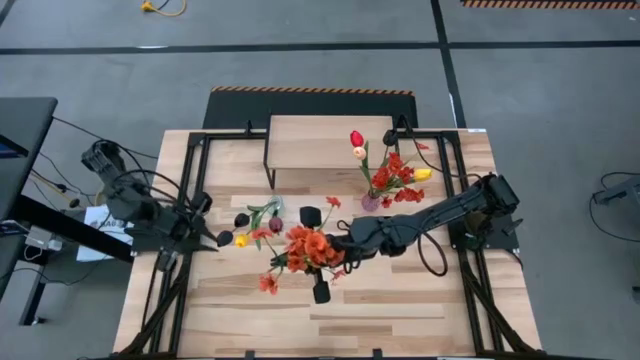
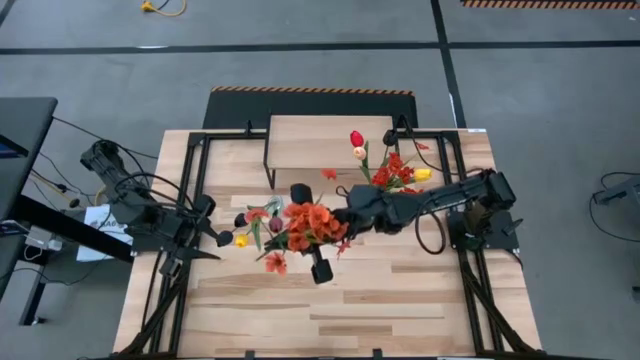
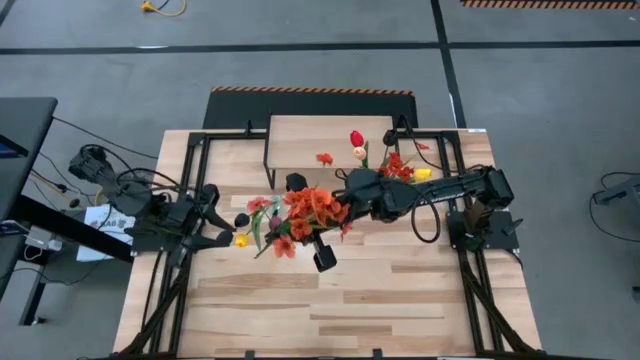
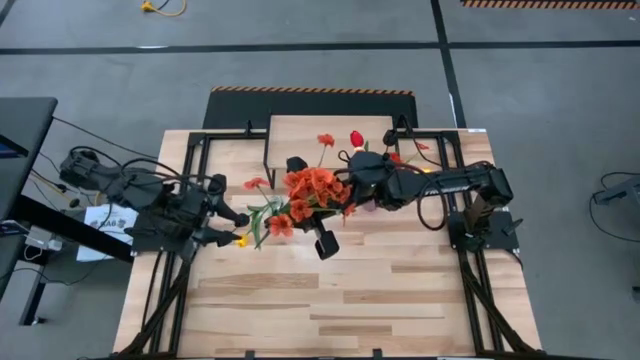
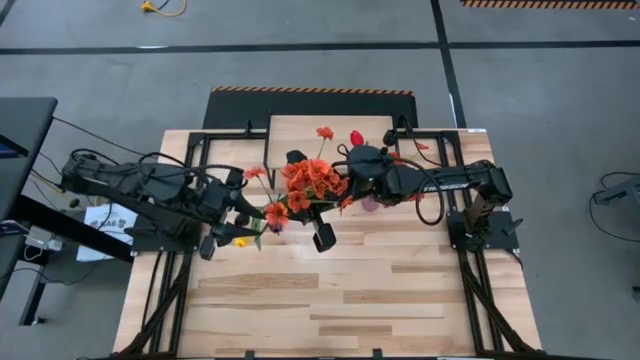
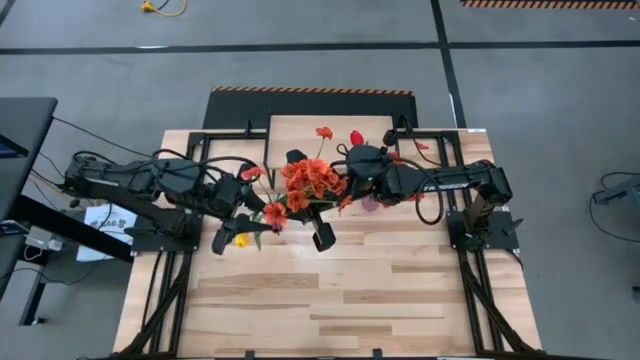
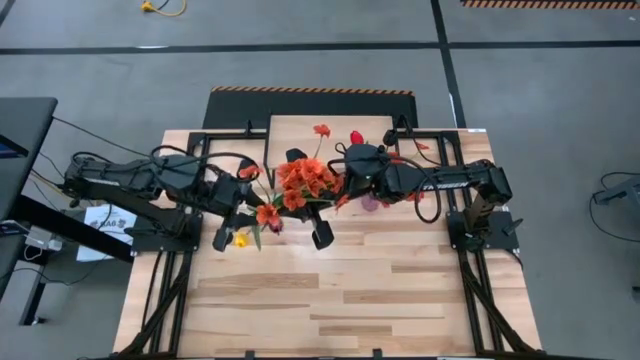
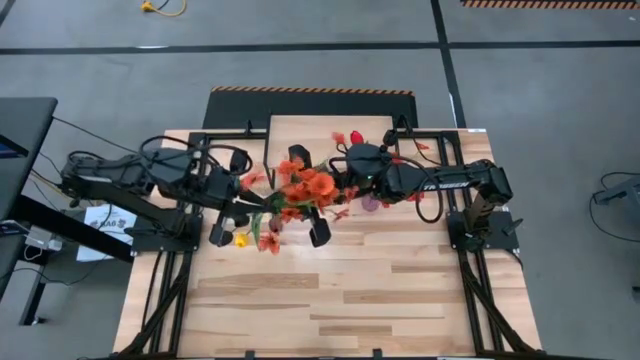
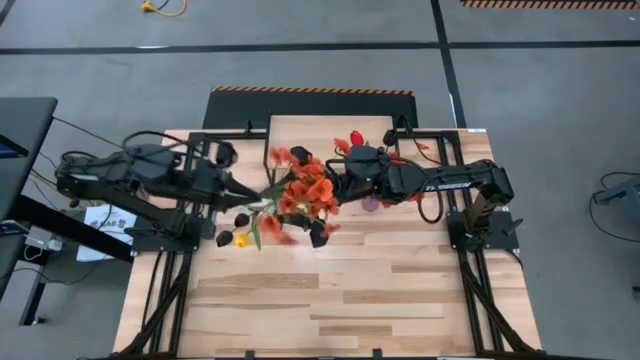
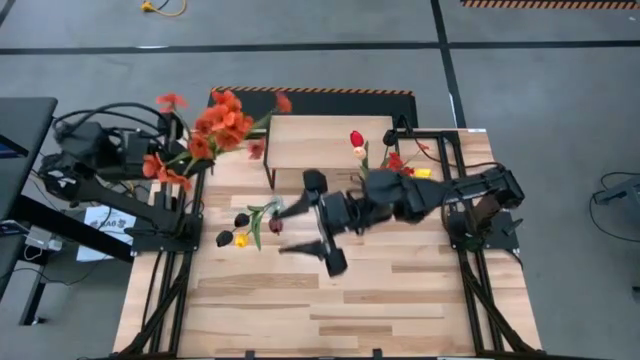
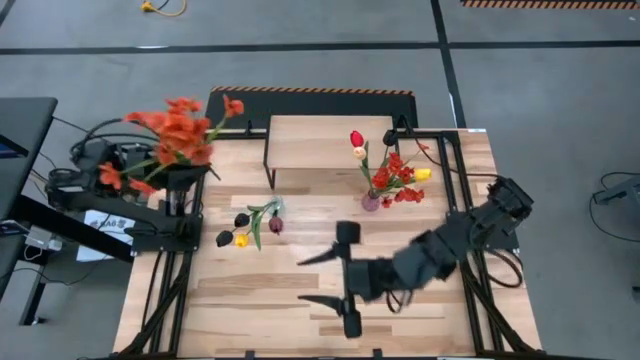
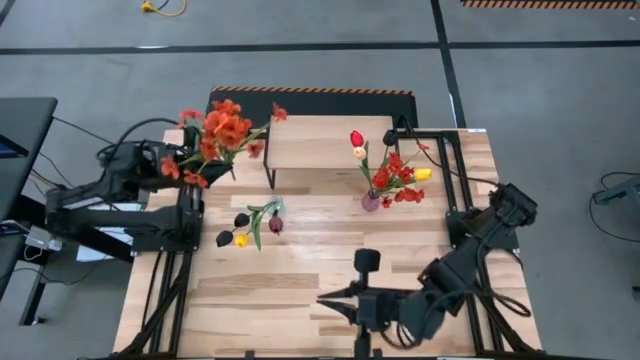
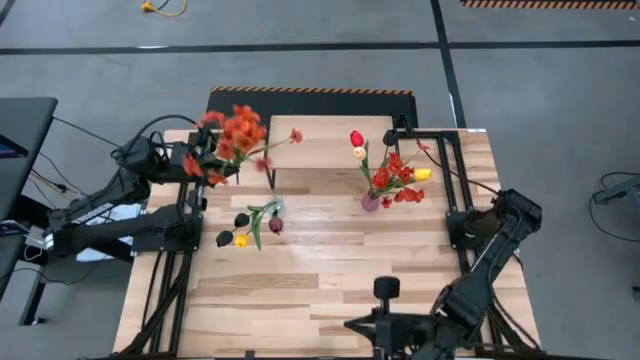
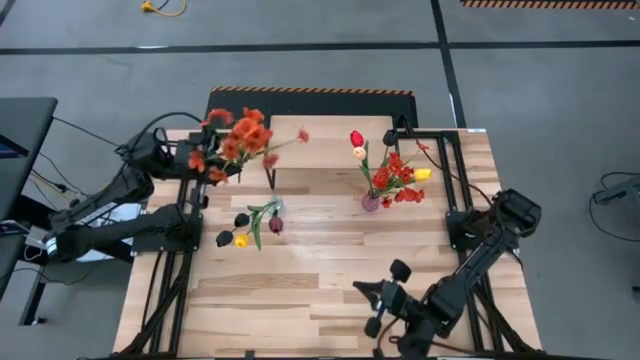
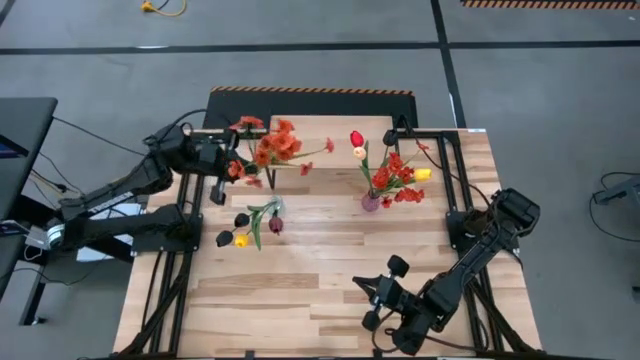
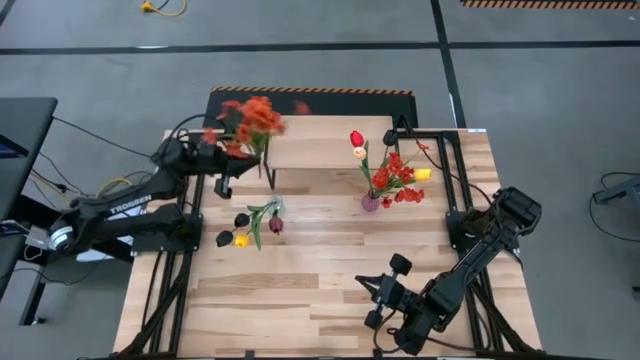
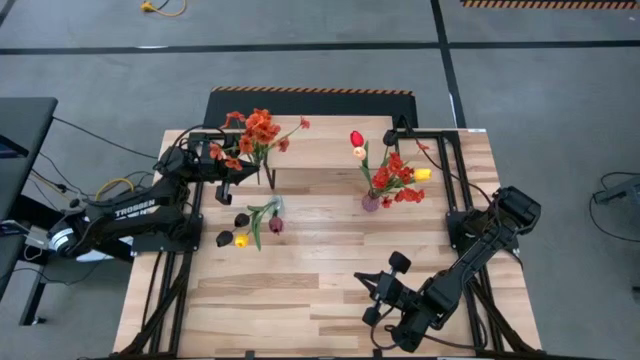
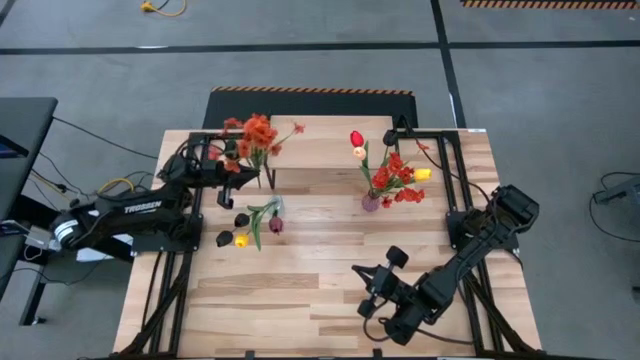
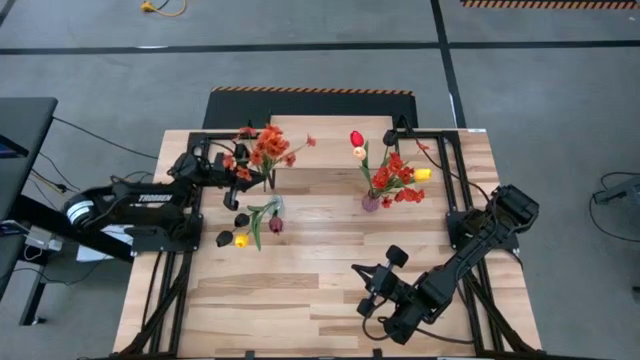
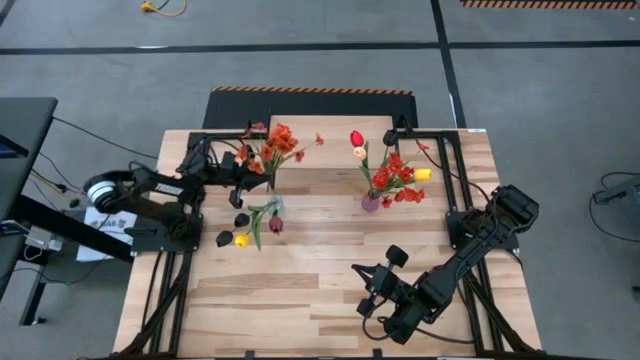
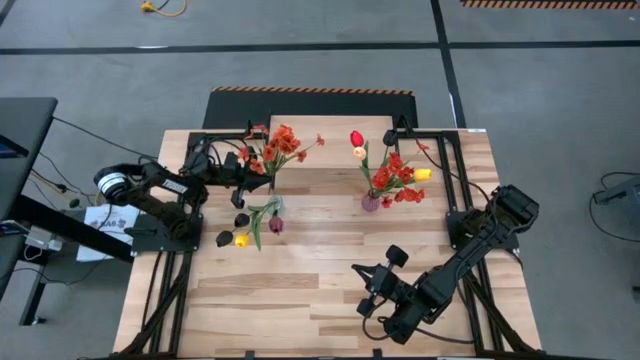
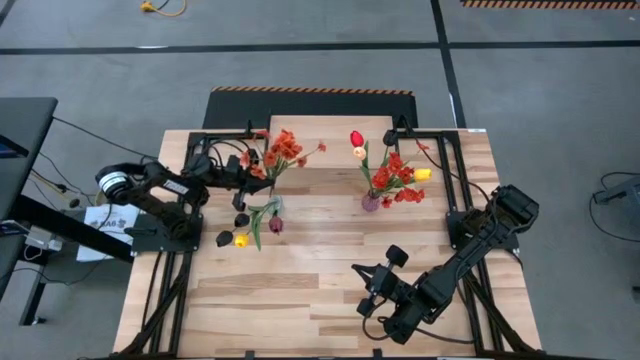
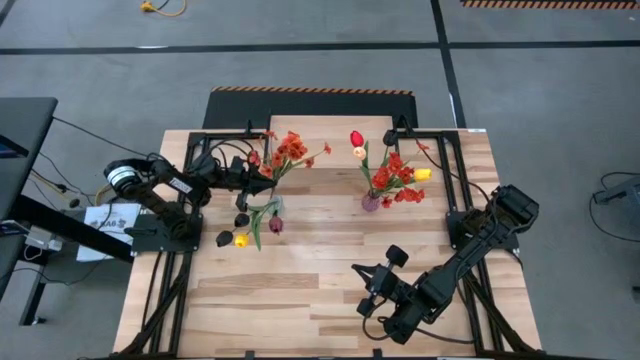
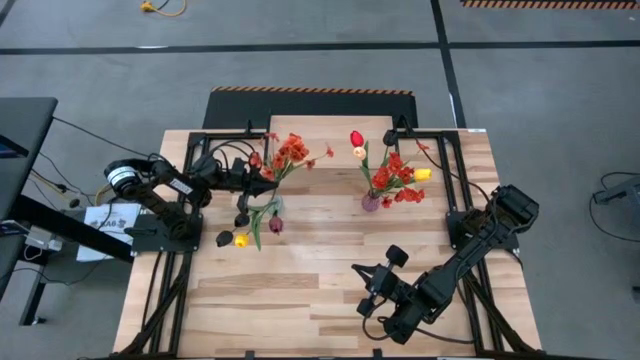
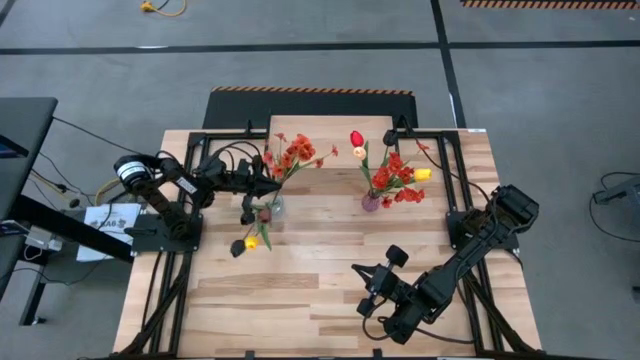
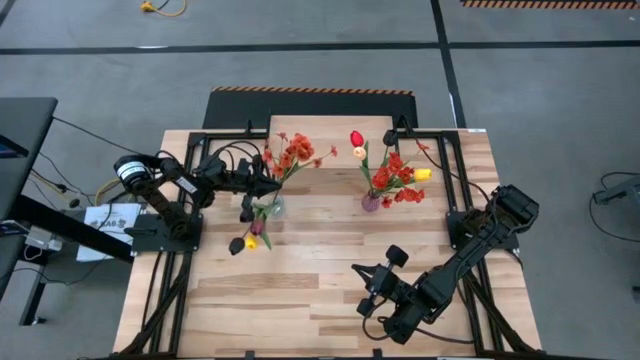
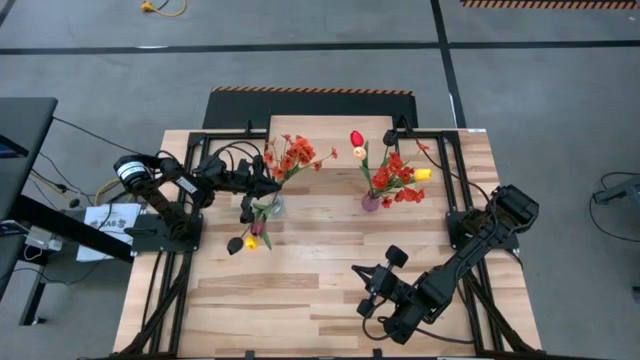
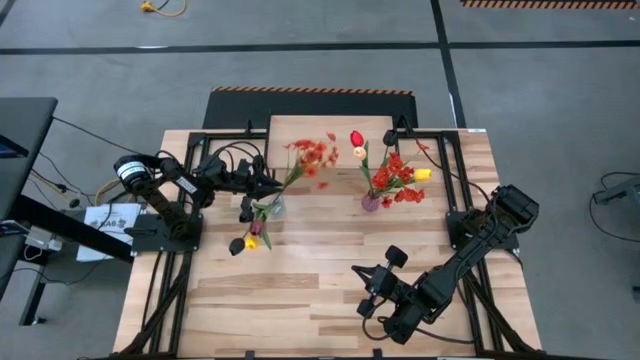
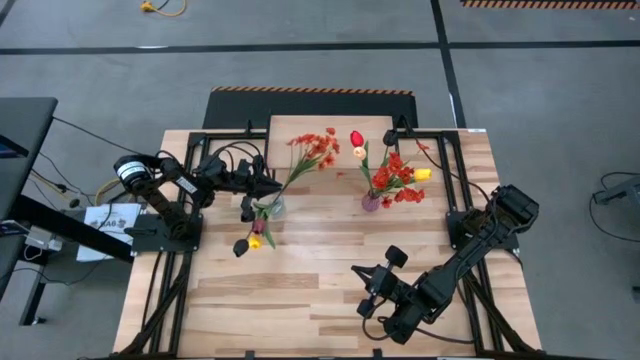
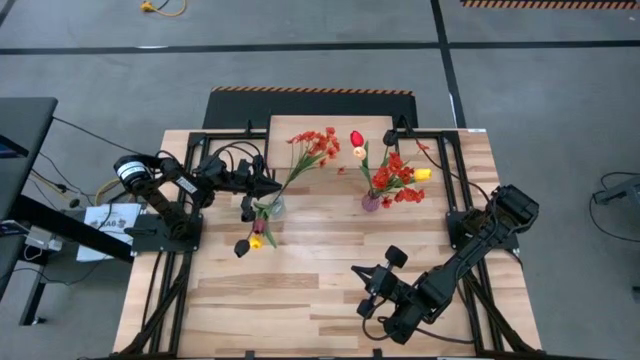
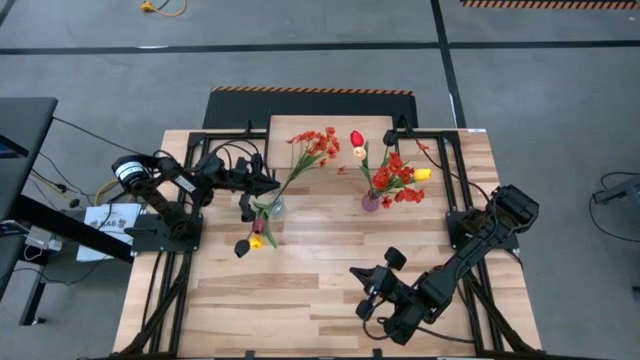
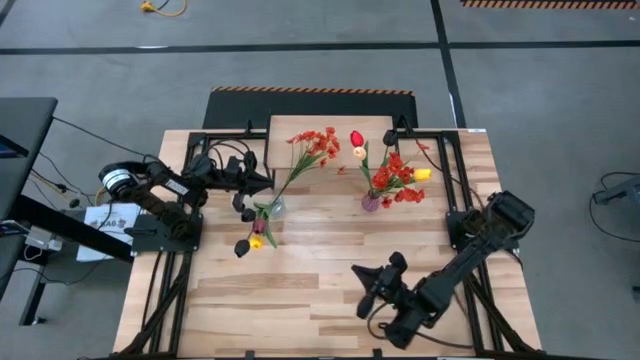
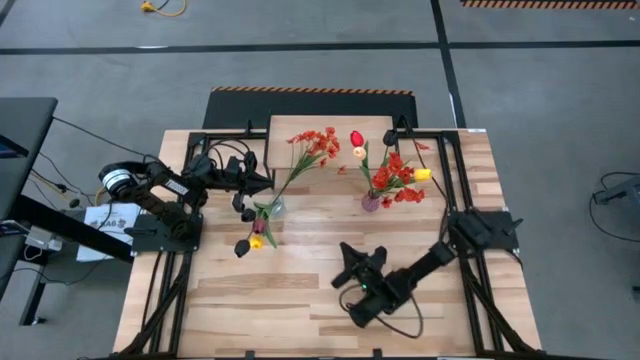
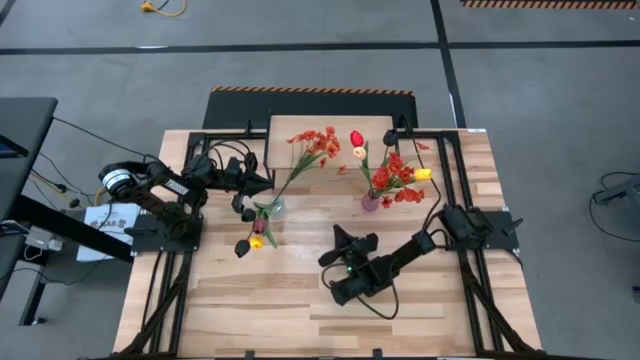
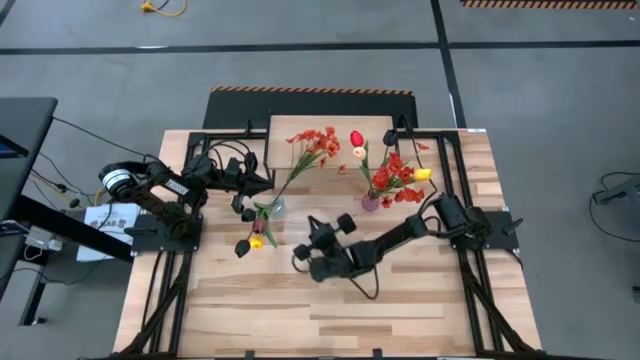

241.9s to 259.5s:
Task: Pick and place flowers into a vace then onto a shelf
Put the red flower into the transparent vase

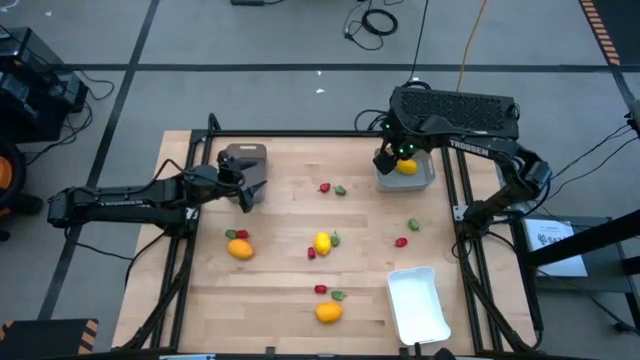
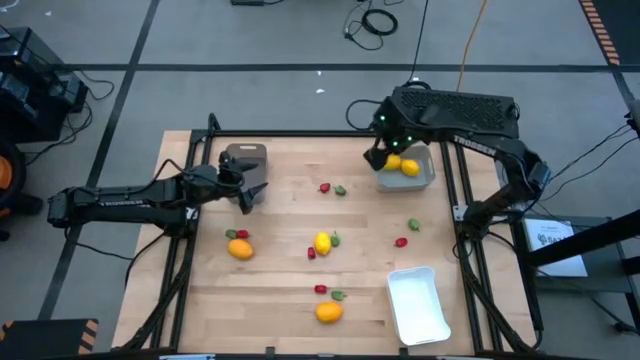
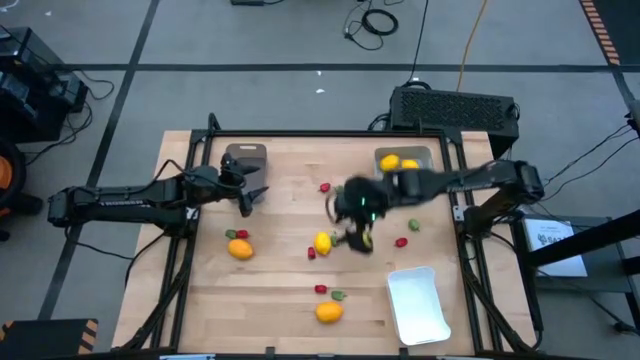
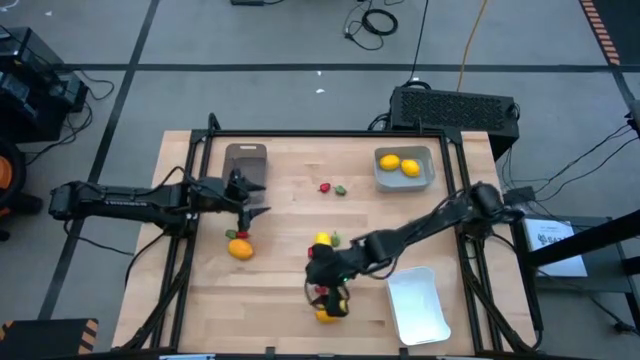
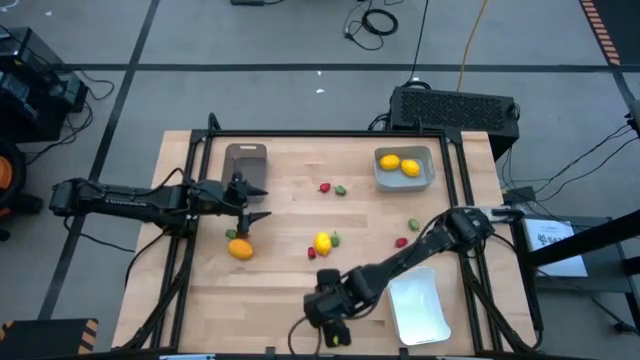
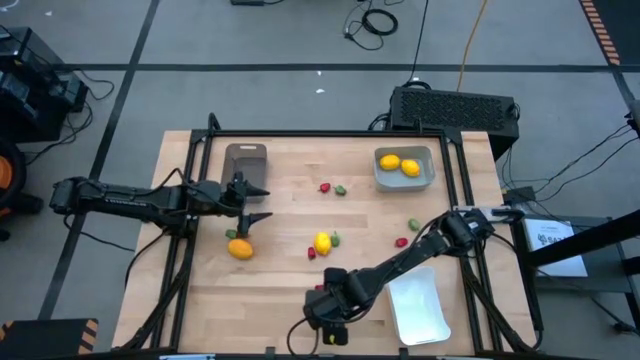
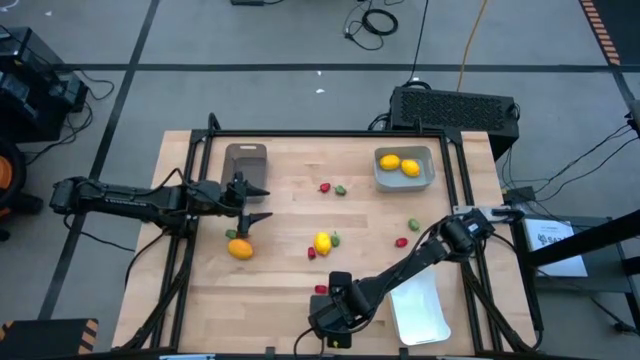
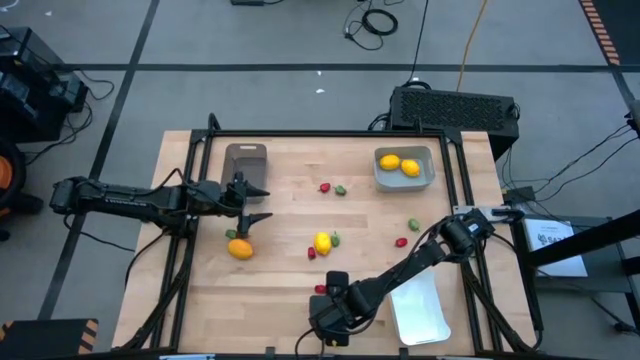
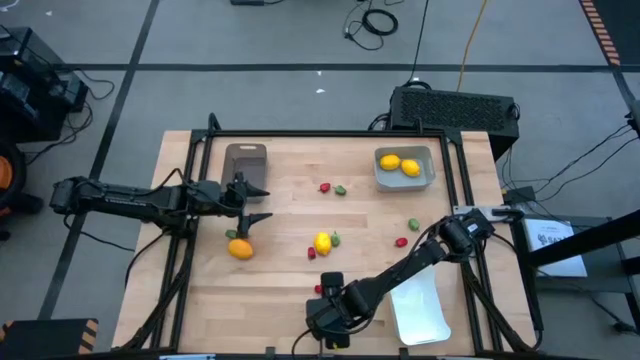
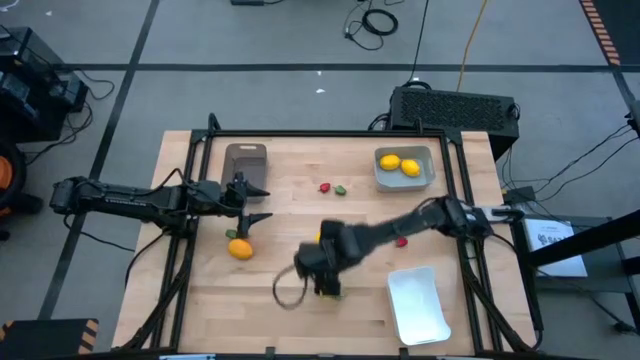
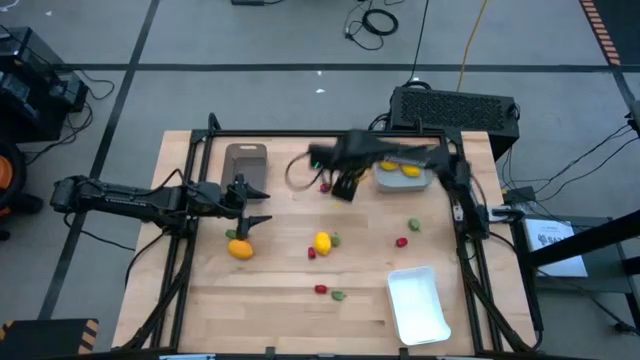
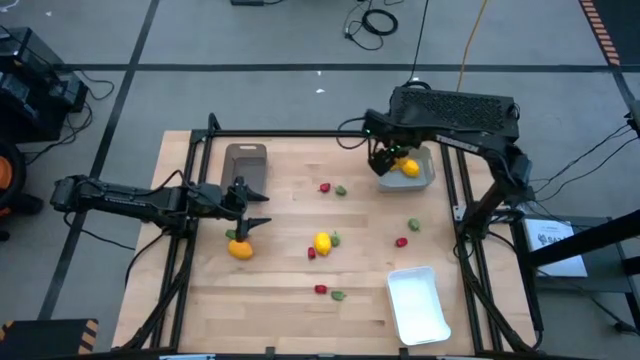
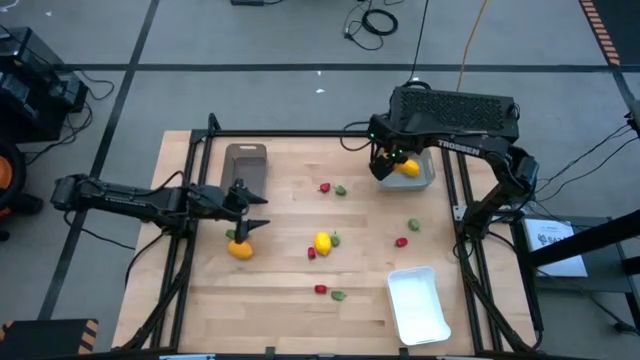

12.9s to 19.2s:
Task: Sort produce into baskets
Put the center bottom yellow lemon into the gray bin
